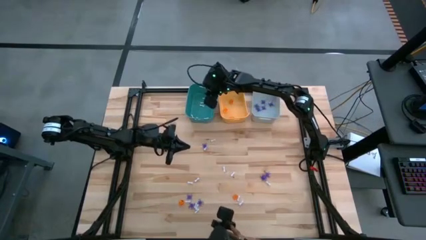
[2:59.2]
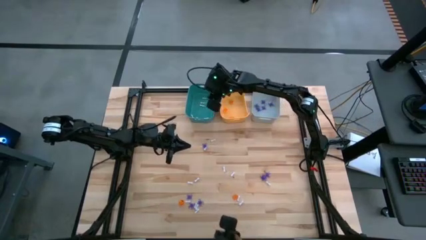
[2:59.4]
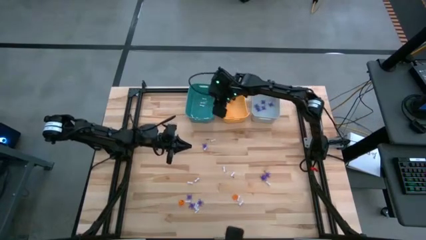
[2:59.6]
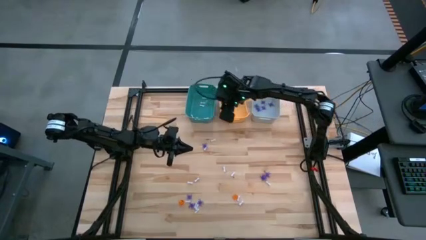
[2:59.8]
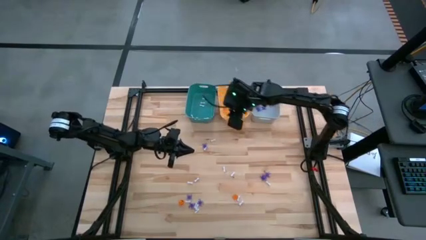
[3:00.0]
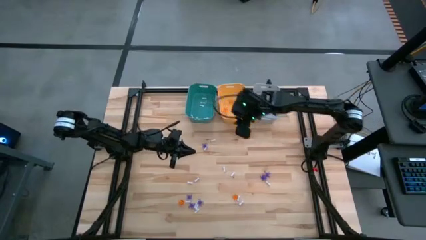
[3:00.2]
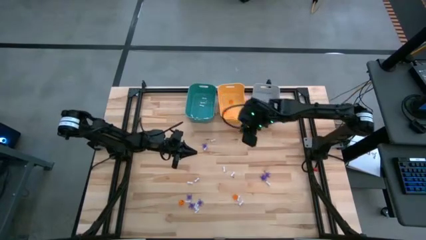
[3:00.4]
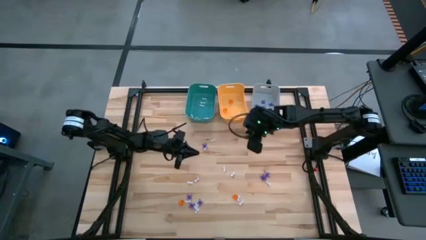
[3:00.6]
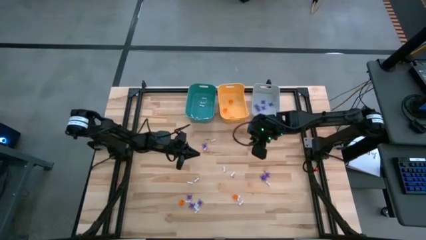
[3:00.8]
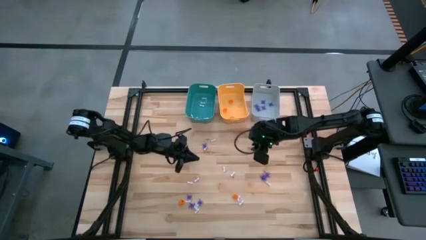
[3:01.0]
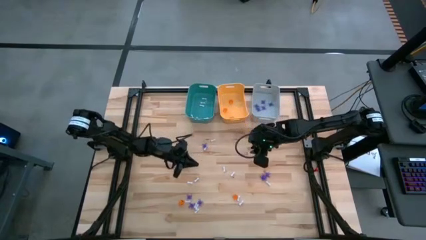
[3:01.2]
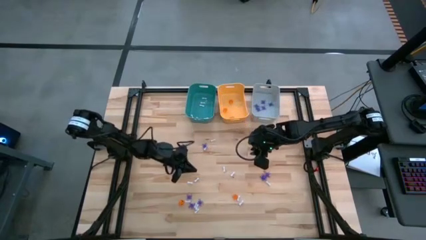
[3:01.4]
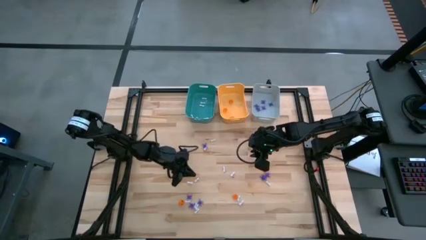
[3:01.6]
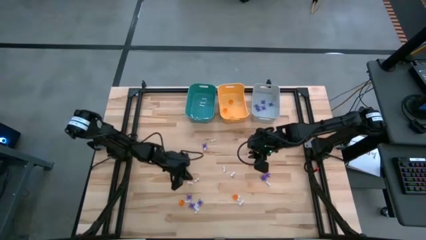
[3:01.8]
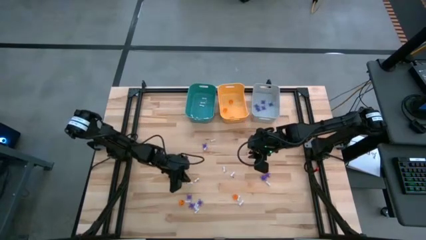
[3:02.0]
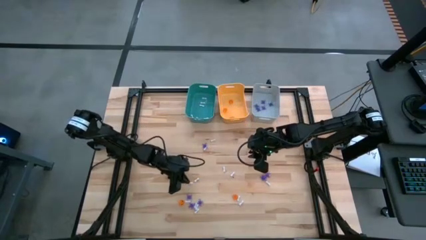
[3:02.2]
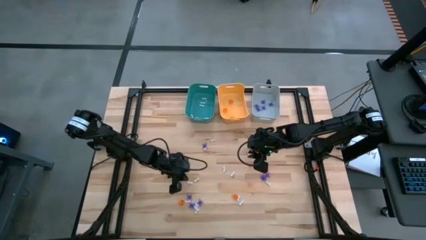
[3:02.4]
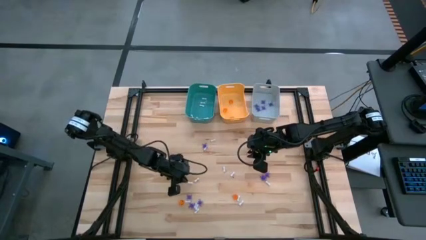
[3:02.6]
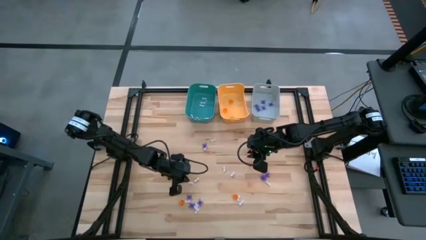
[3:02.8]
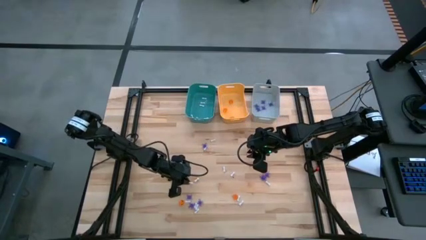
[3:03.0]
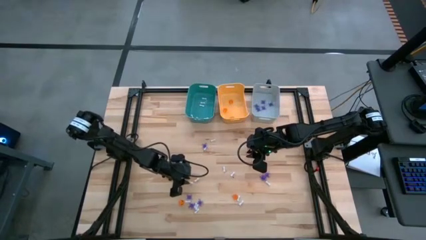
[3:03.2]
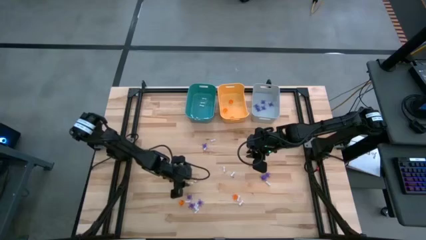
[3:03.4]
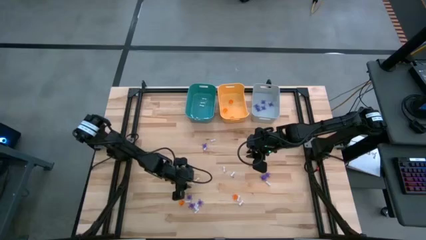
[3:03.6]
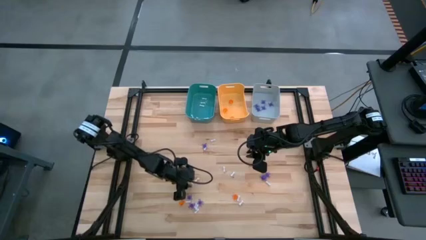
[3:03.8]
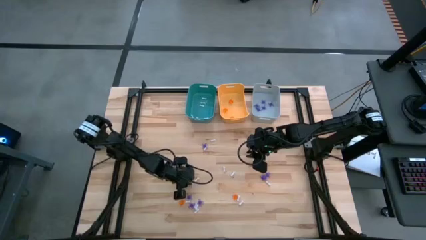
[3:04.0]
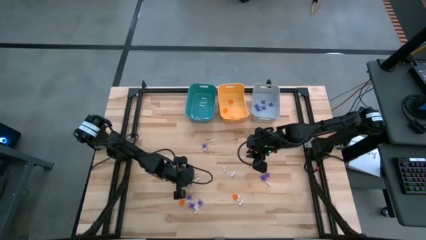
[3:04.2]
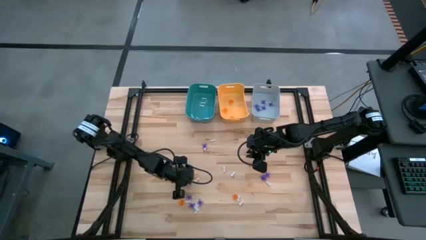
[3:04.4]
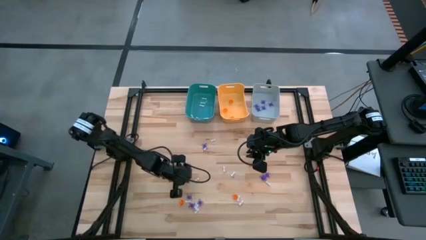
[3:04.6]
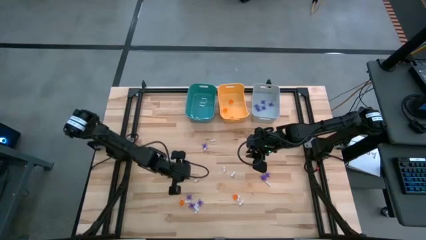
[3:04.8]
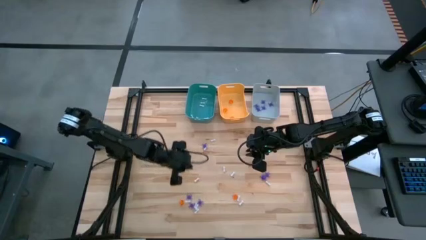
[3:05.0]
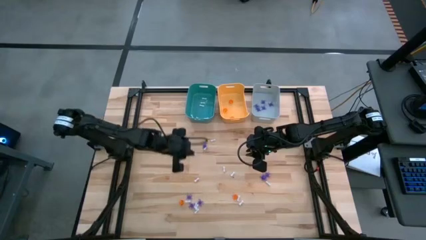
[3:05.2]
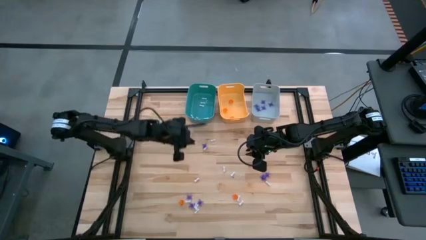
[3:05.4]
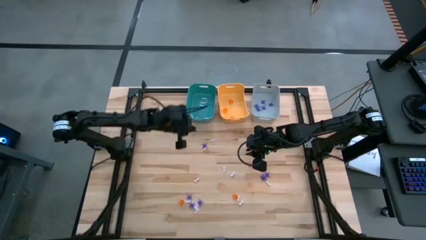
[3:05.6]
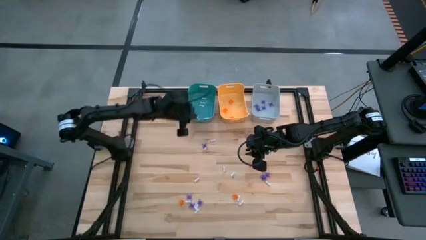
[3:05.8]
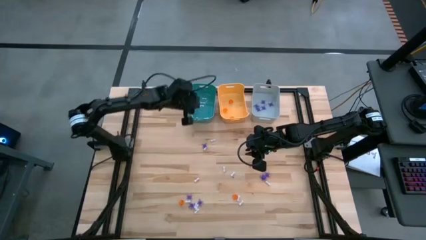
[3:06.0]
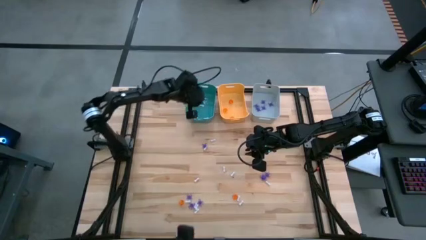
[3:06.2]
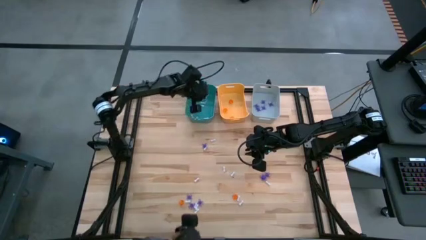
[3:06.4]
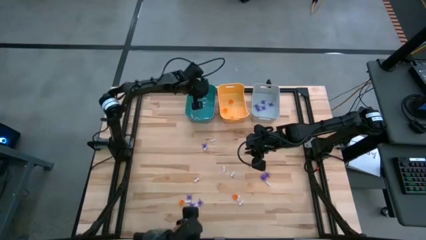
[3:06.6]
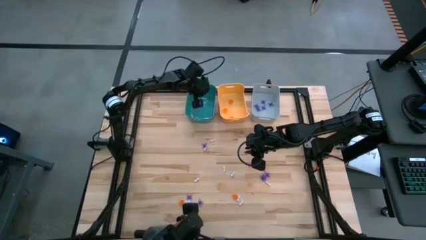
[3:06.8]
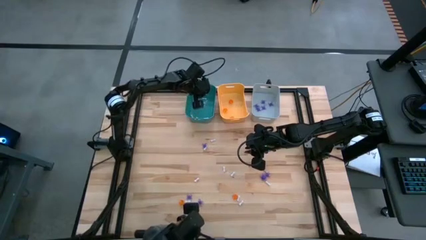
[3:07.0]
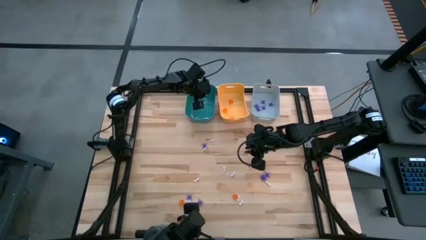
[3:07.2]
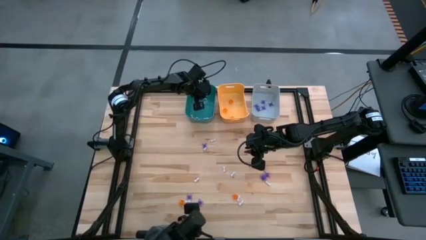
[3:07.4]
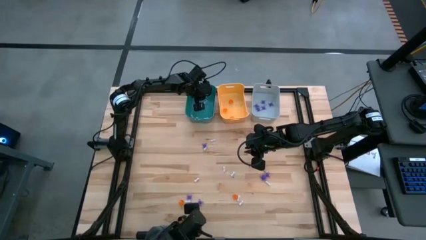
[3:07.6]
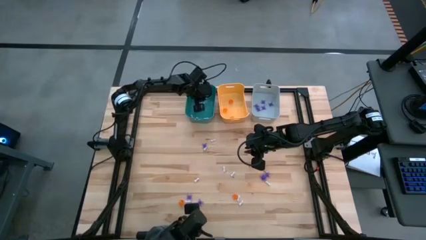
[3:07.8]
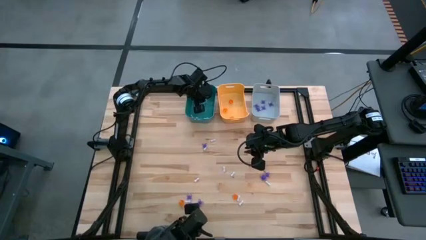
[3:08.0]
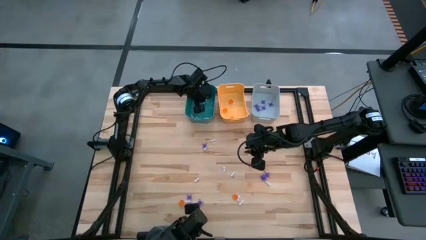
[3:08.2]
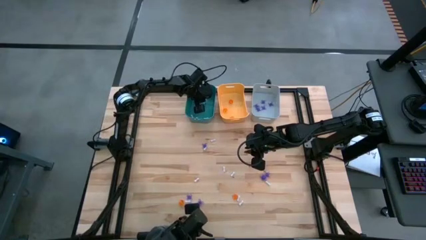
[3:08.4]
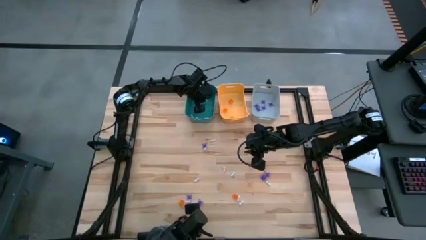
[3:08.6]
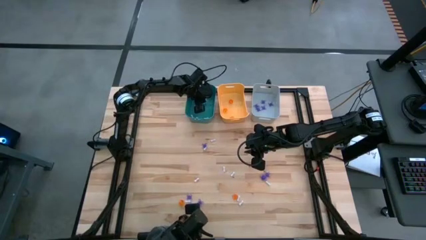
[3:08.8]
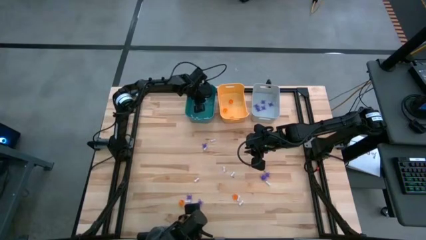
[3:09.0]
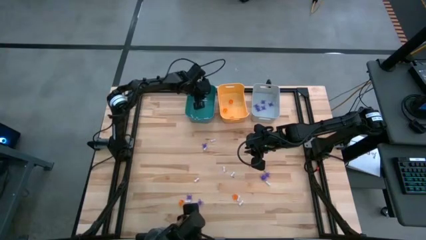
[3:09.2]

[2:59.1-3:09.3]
Task: Sort Halloween decoration
Put the white bone toy into the blue bin

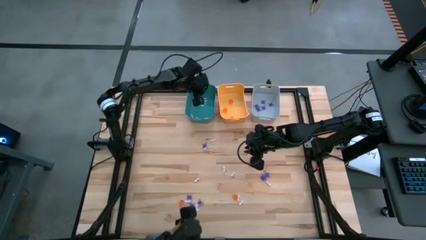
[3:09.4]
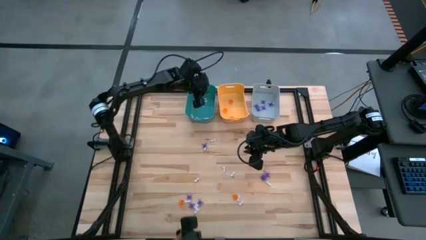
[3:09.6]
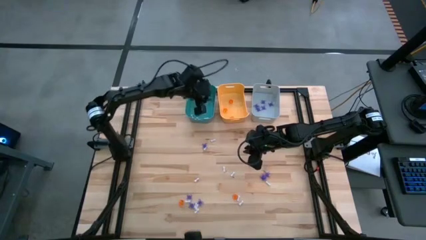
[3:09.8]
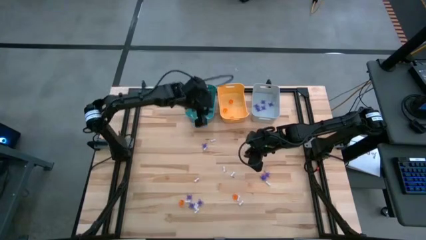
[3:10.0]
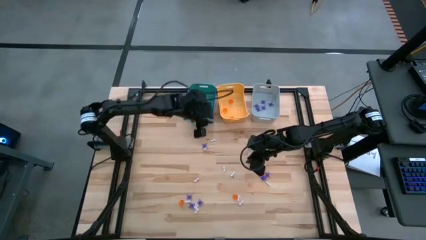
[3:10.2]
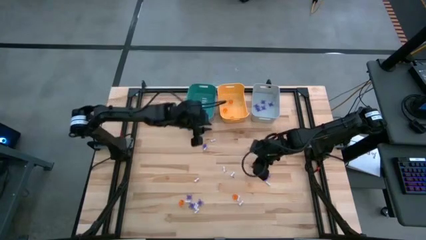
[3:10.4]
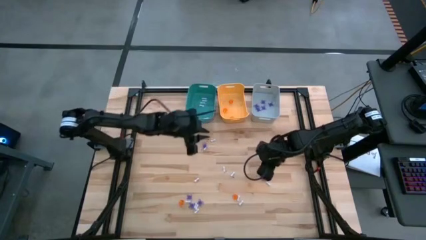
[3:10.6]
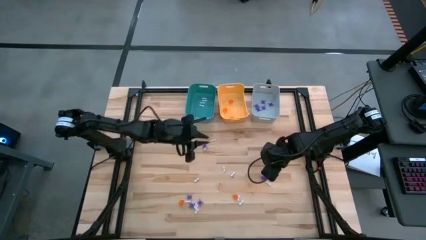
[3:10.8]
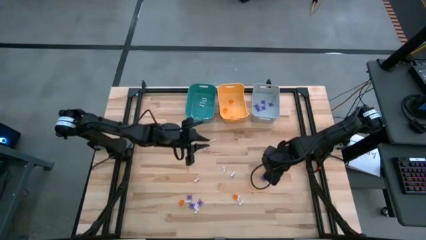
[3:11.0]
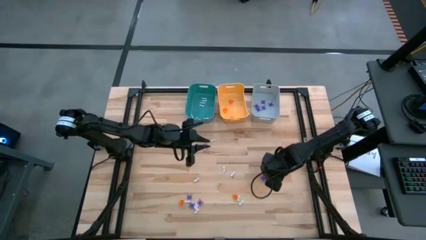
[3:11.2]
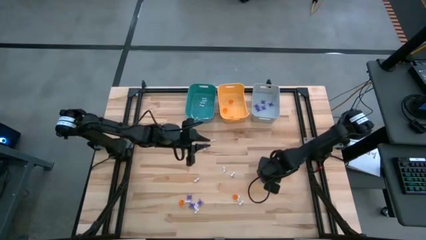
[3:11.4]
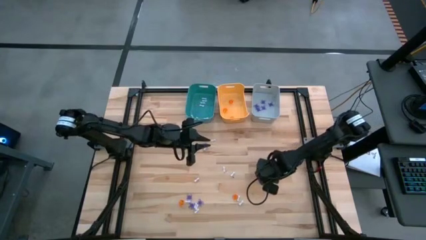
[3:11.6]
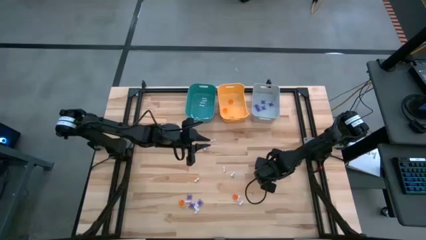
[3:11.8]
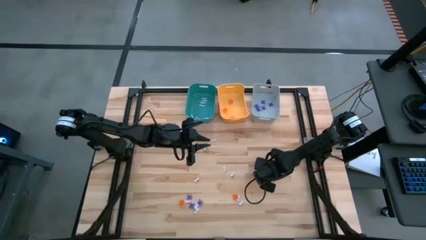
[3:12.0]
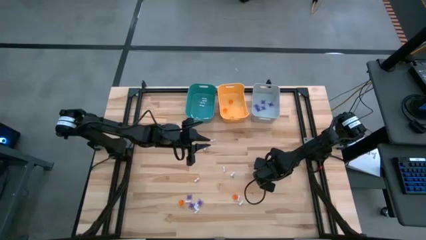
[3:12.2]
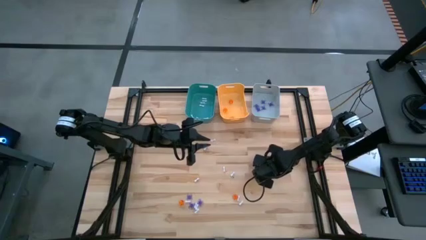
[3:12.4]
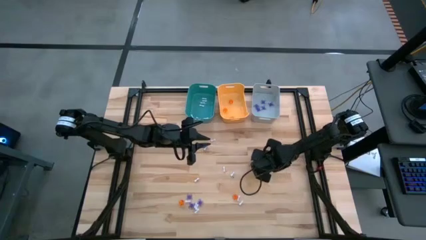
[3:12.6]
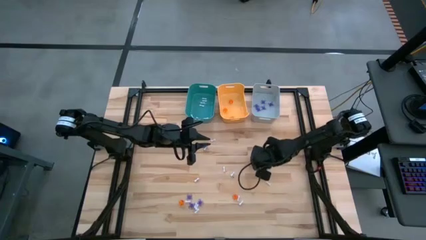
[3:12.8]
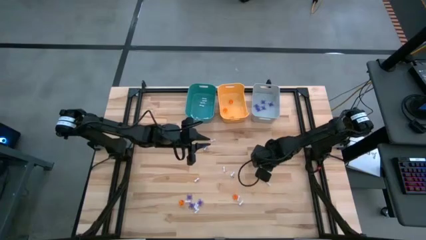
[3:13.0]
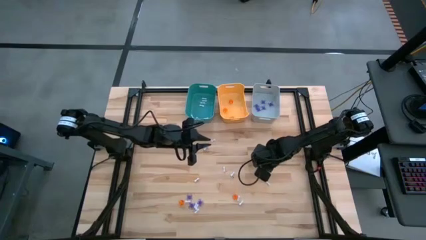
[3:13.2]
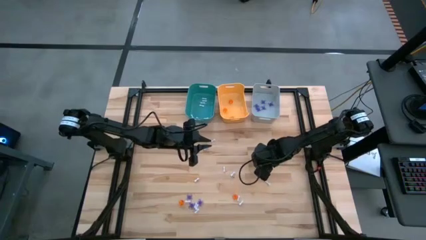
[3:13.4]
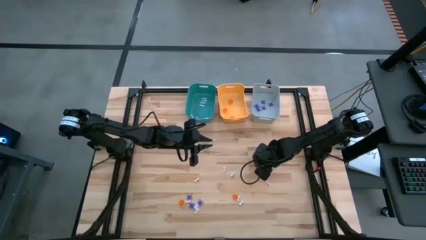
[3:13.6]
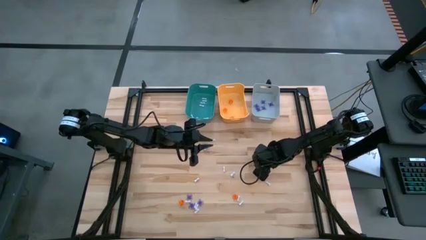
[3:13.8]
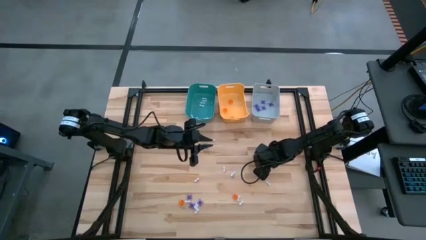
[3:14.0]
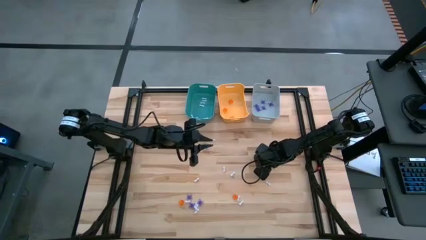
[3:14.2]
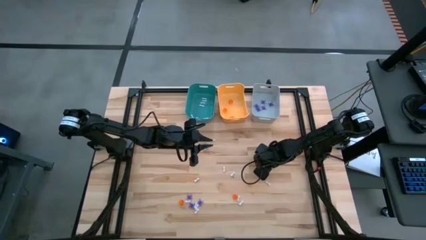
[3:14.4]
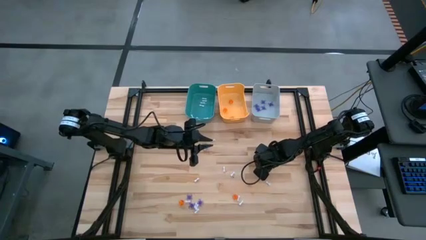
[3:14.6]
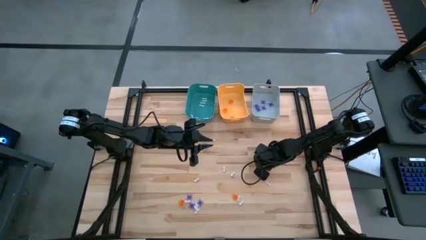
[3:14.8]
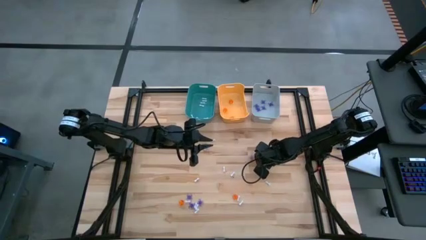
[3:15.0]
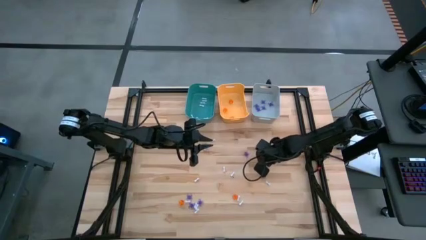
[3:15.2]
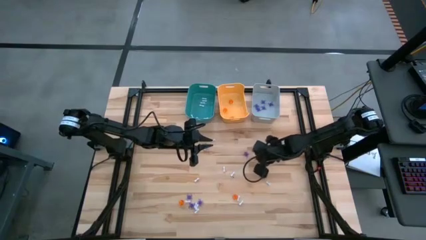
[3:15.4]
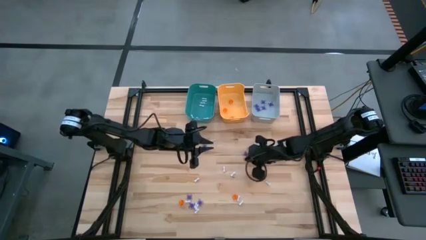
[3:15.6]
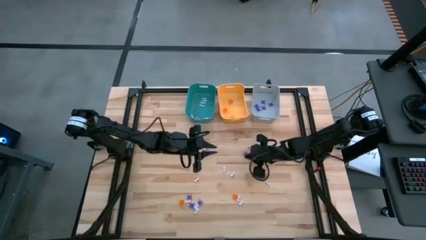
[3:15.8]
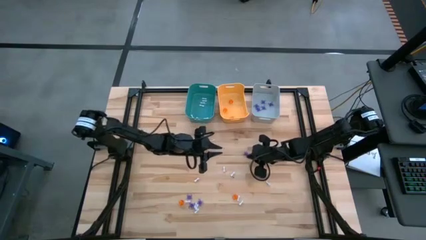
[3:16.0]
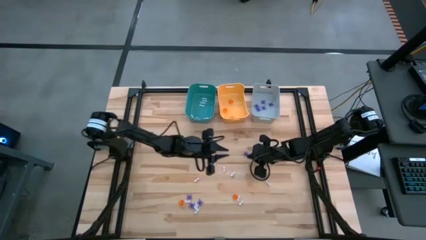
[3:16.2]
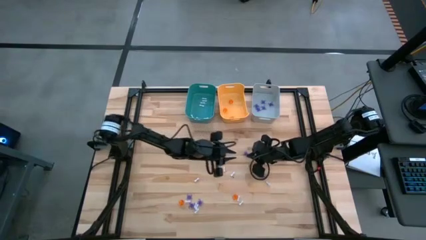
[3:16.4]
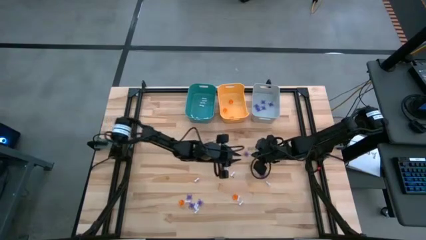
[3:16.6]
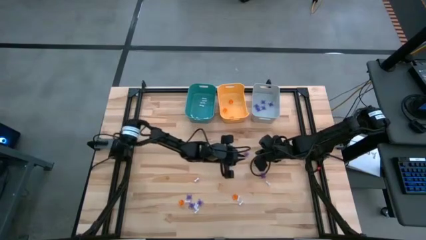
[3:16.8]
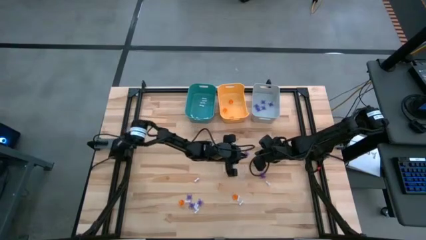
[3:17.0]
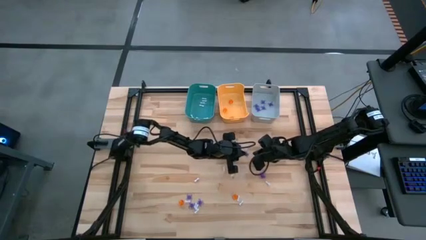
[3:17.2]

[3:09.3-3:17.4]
Put the purple spider toy into the gray bin
